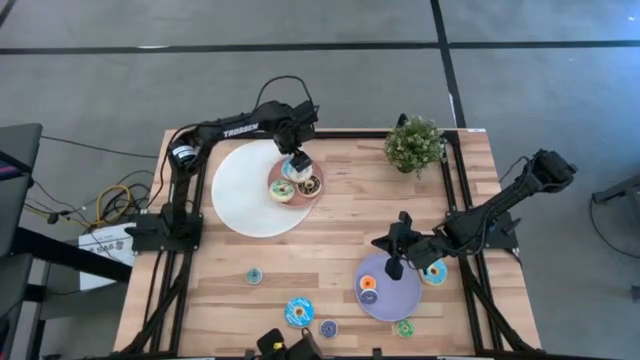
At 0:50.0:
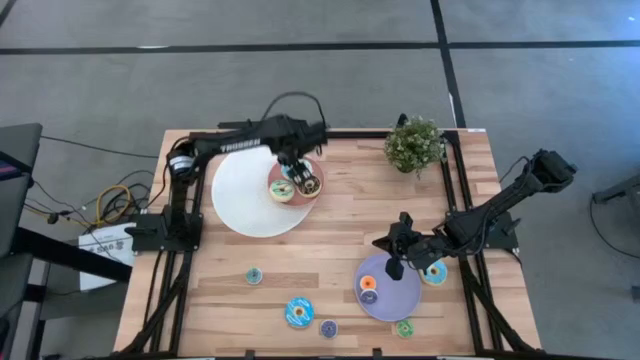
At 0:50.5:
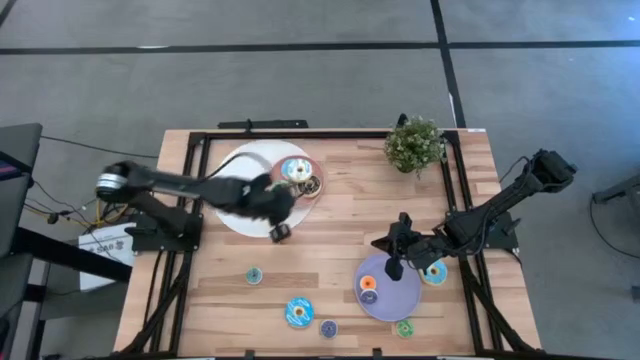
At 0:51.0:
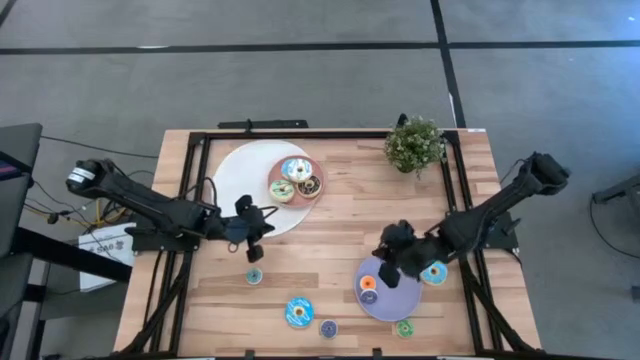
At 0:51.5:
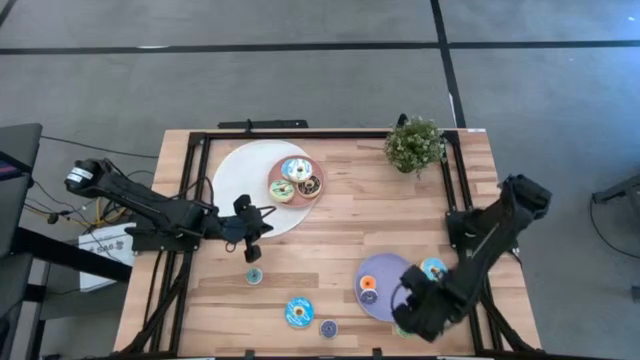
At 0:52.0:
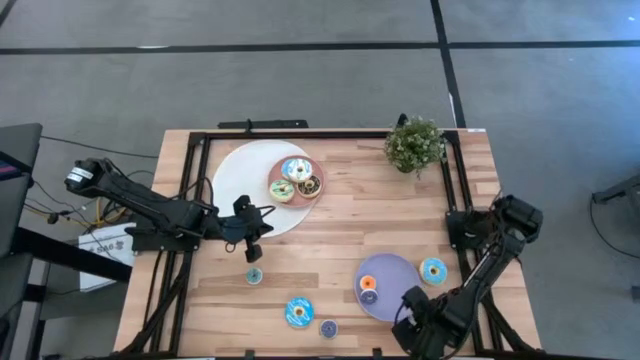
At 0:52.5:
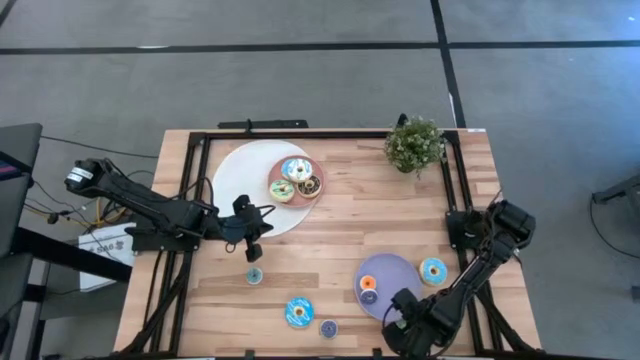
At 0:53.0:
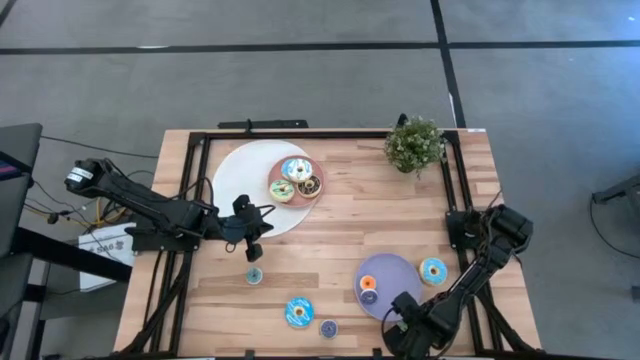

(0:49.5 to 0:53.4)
Task: Pick & Place donuts
Put the small green donut on the purple plate

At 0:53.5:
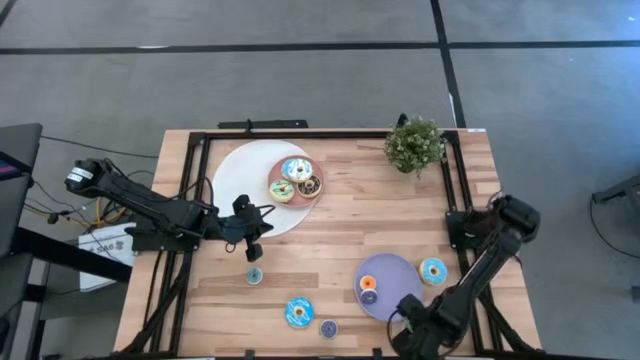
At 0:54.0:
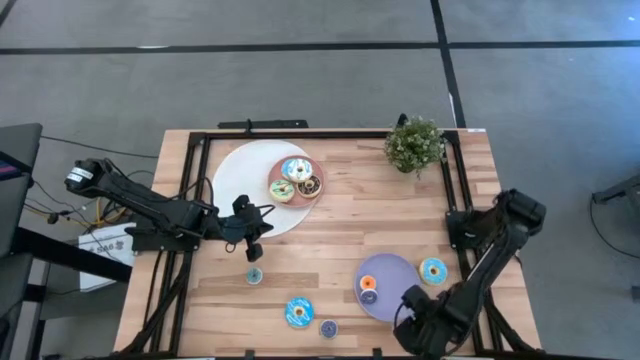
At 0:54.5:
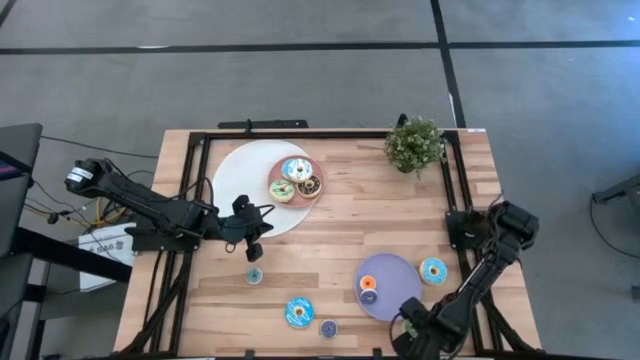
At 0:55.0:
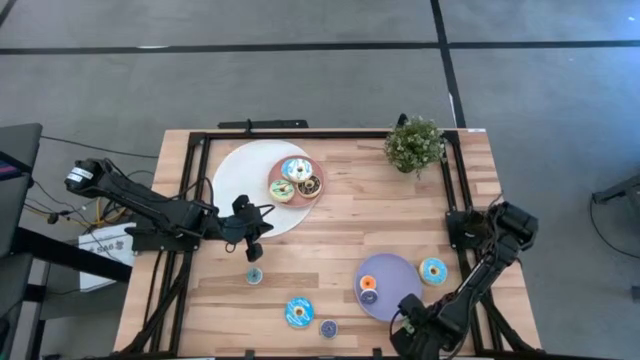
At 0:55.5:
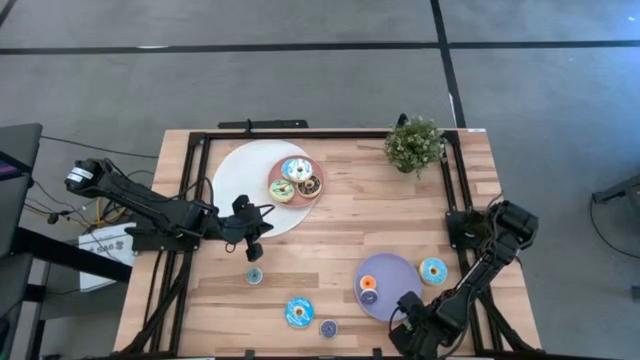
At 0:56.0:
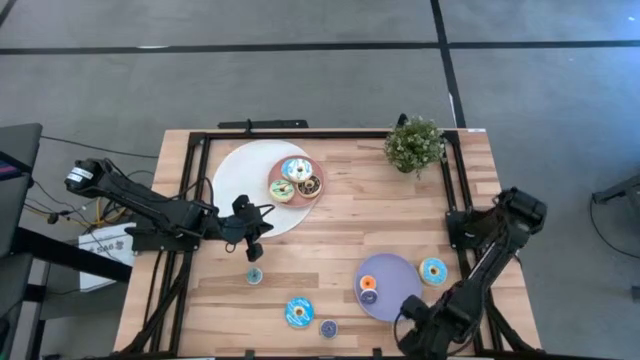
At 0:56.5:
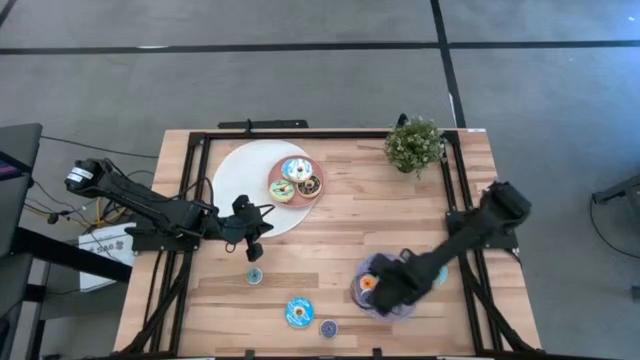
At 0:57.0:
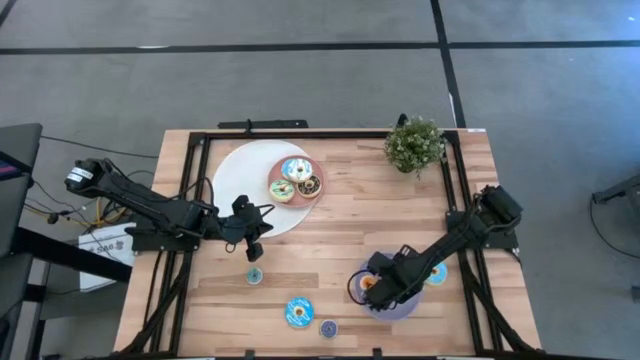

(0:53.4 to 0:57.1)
Put the small green donut on the purple plate

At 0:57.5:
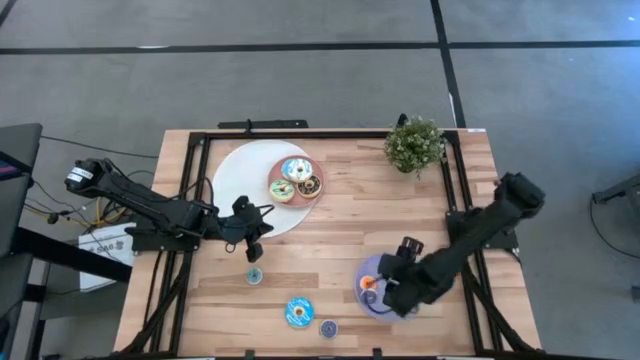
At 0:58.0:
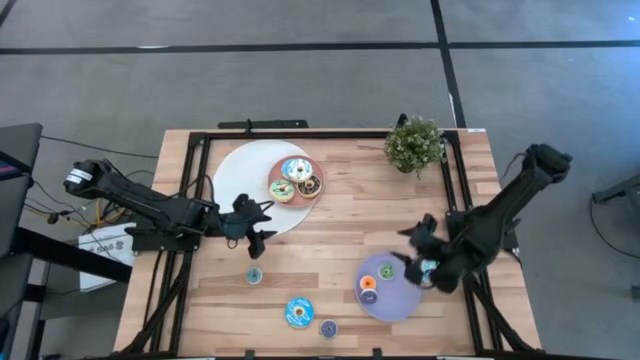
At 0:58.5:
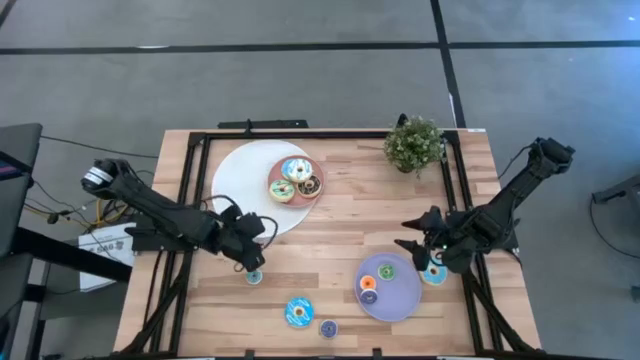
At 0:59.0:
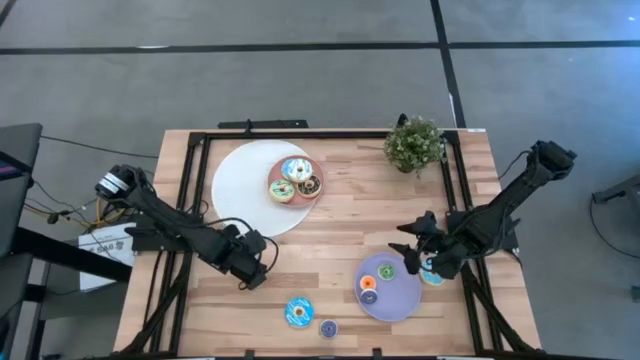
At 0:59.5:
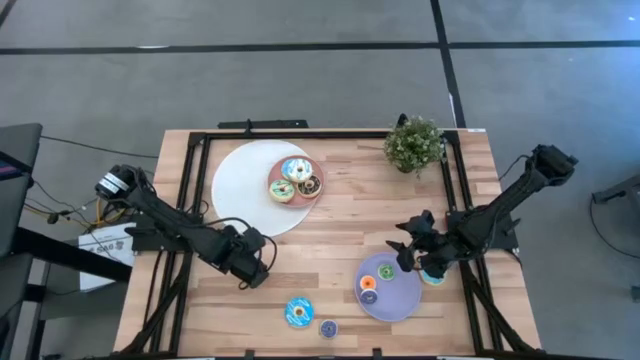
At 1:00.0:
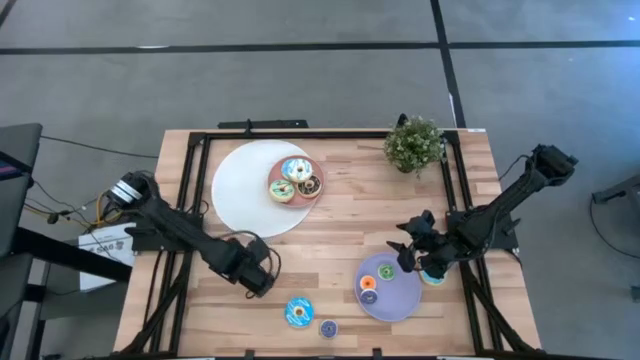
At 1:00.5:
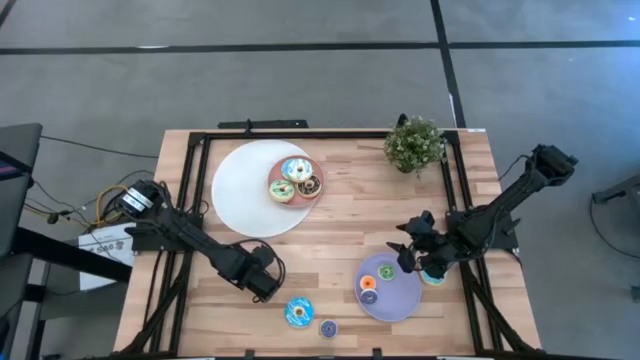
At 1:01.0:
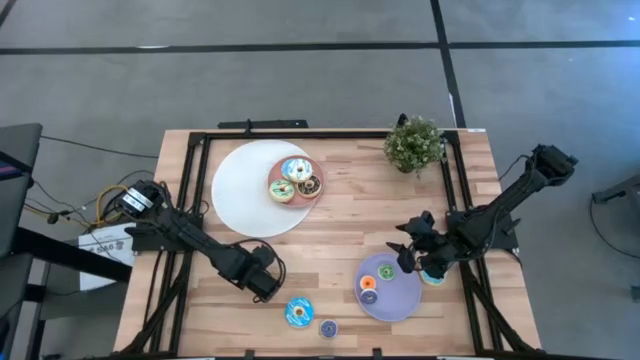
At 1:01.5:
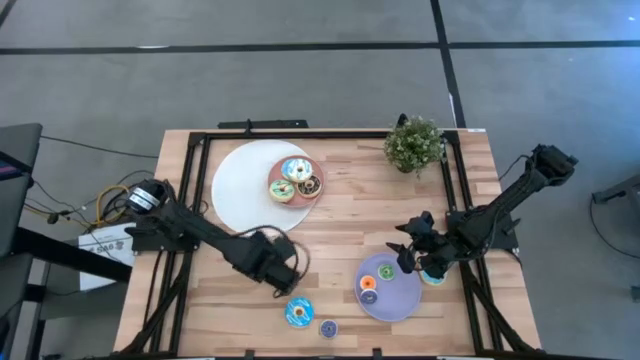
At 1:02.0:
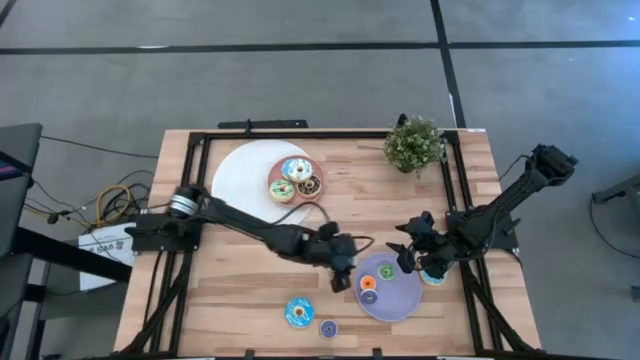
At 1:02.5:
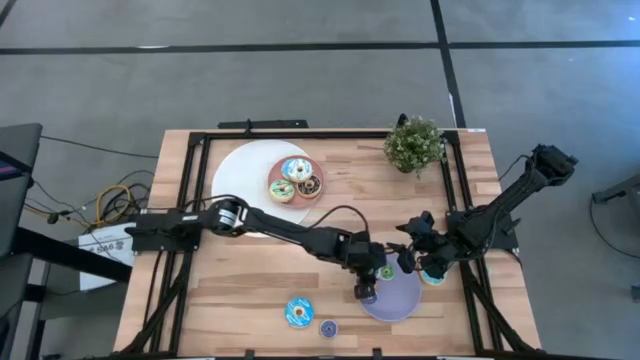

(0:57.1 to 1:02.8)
Put the small light blue donut on the purple plate

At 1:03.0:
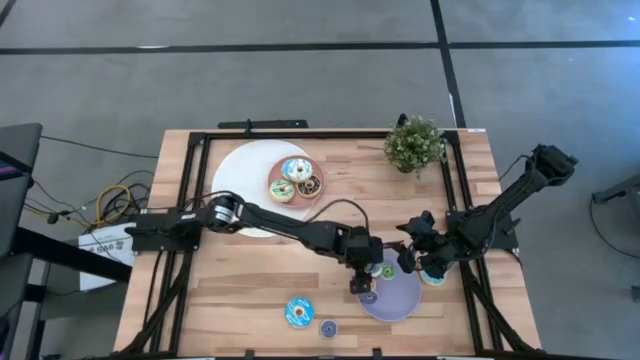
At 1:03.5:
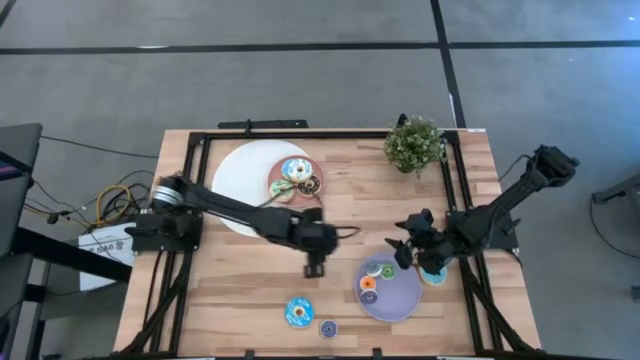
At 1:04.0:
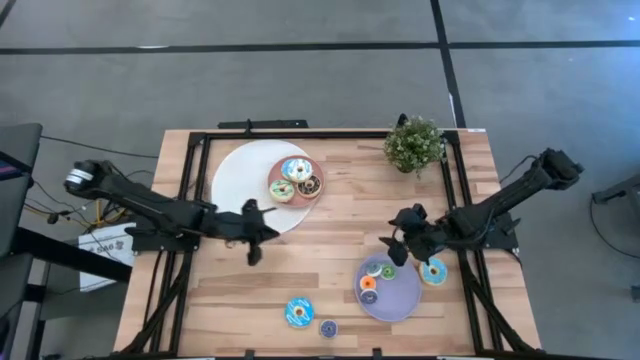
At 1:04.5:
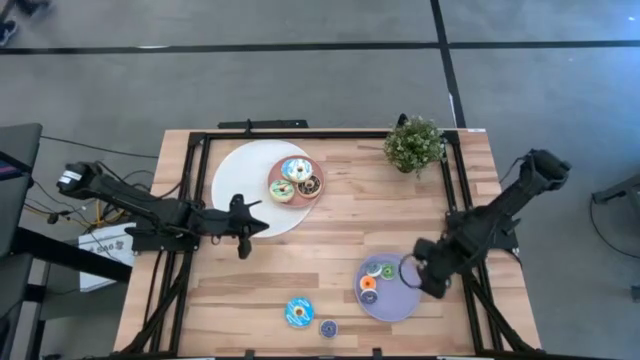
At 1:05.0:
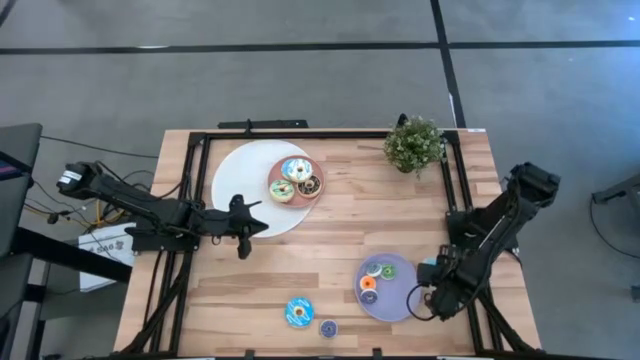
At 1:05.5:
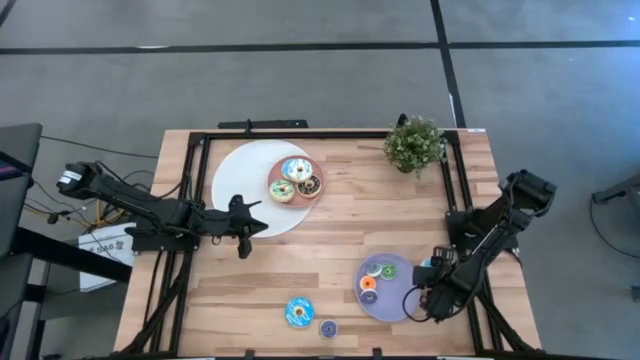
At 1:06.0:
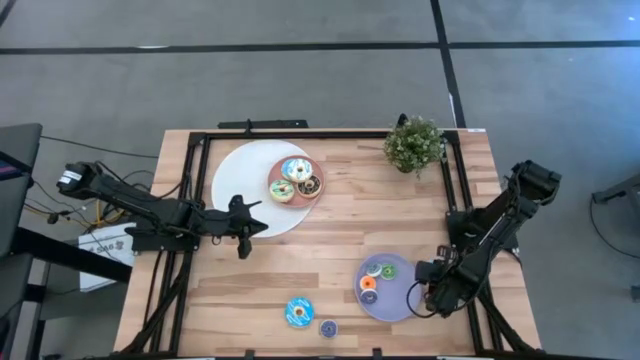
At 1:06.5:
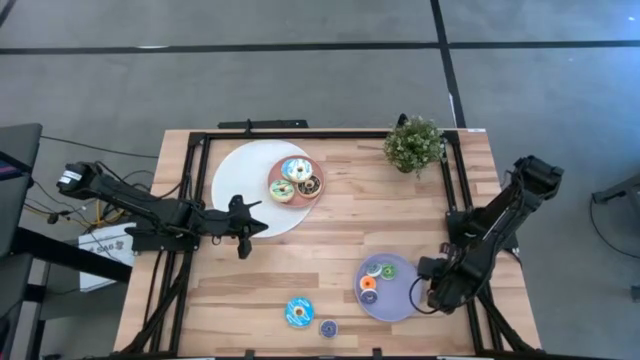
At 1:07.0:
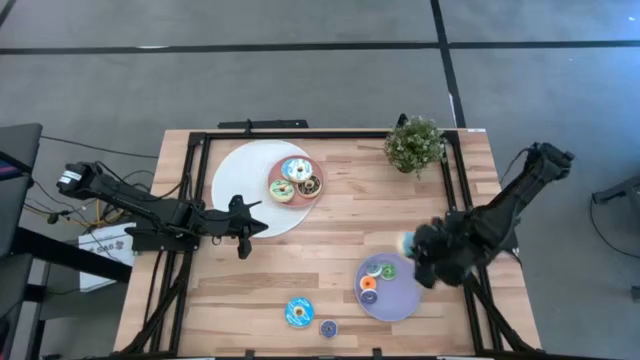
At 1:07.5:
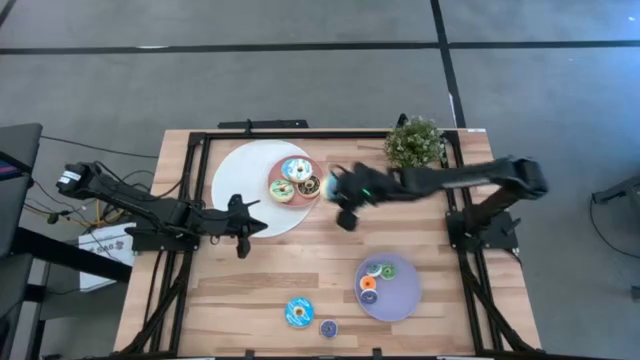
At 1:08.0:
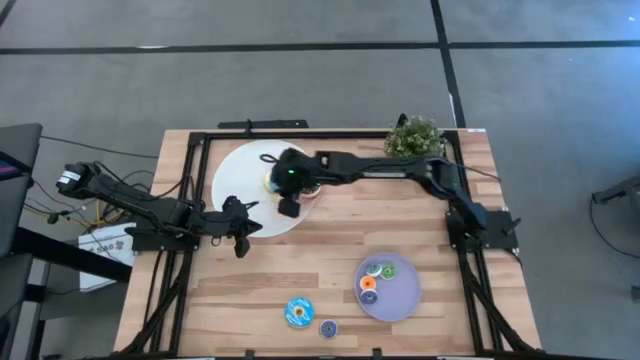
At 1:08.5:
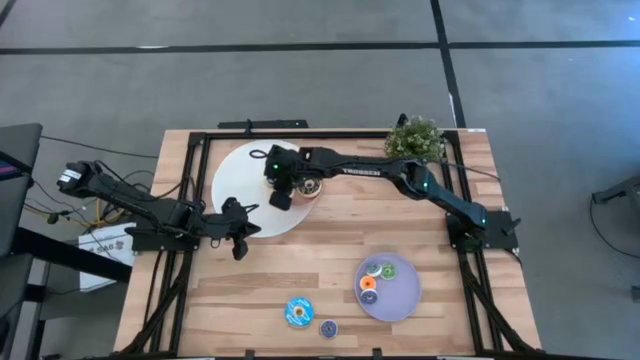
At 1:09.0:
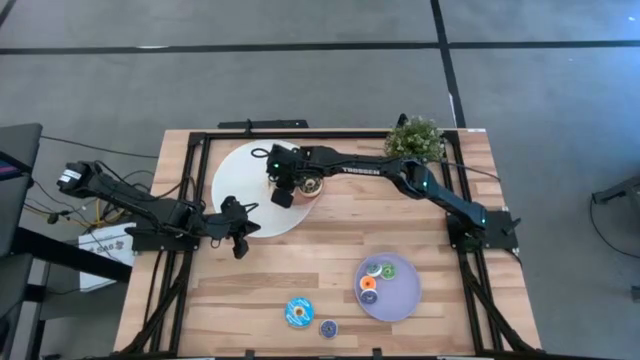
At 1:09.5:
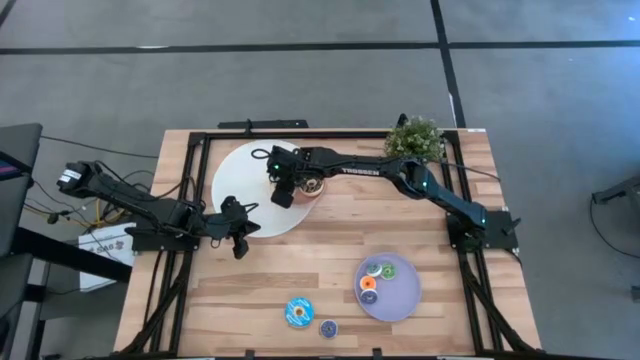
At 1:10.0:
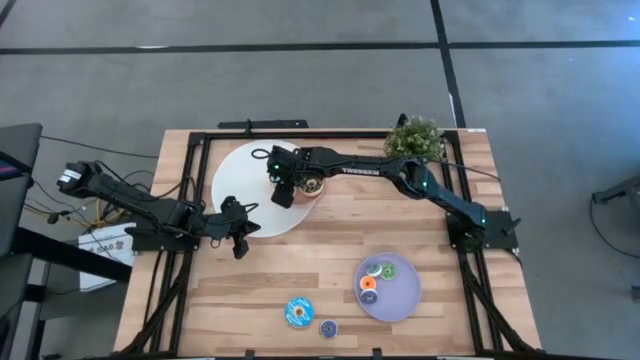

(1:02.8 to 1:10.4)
Put the right large blue donut on the pink plate
